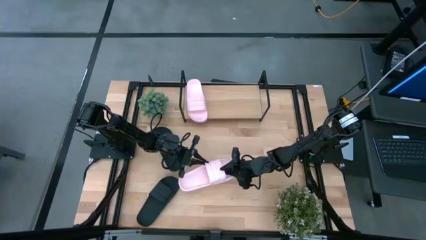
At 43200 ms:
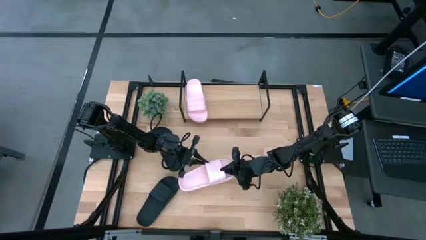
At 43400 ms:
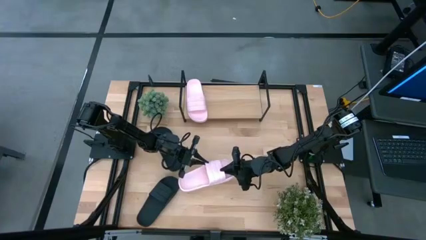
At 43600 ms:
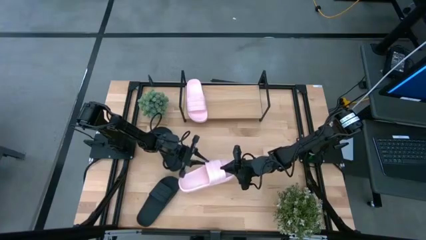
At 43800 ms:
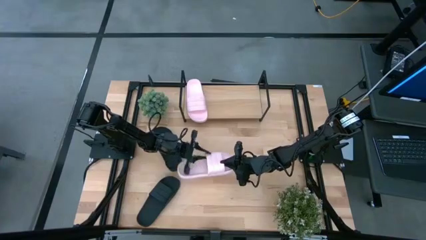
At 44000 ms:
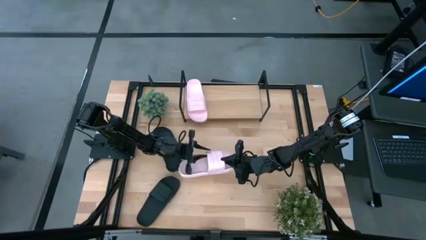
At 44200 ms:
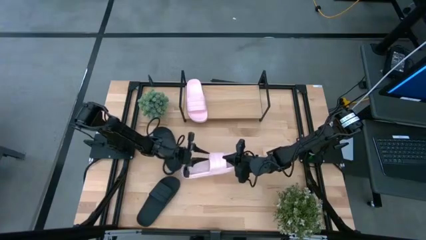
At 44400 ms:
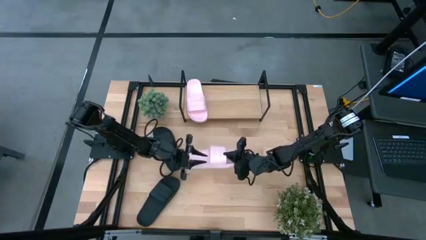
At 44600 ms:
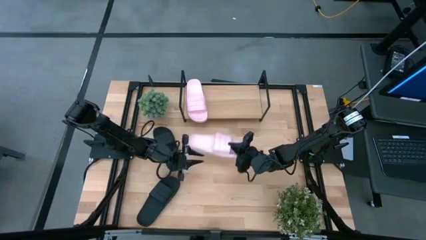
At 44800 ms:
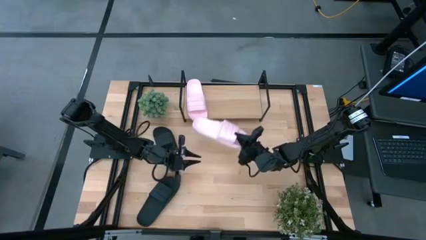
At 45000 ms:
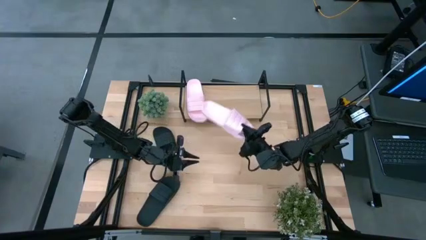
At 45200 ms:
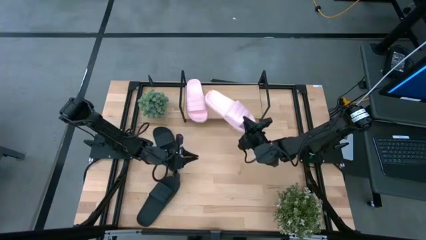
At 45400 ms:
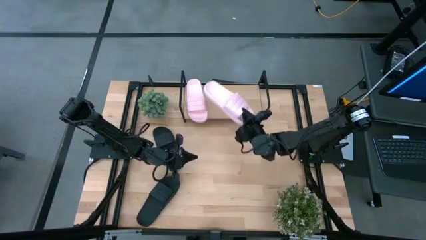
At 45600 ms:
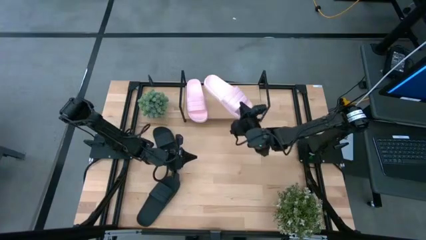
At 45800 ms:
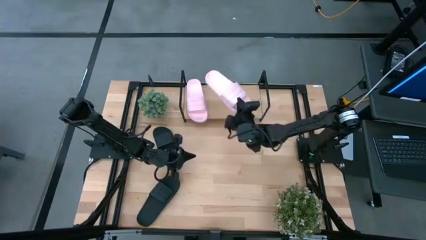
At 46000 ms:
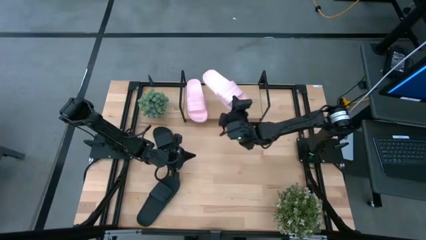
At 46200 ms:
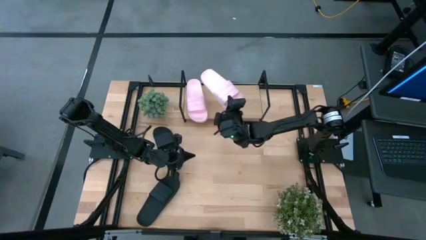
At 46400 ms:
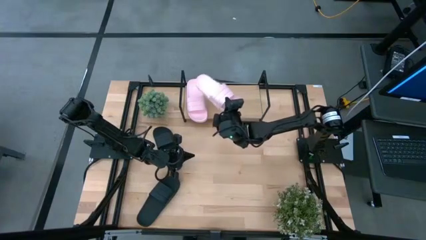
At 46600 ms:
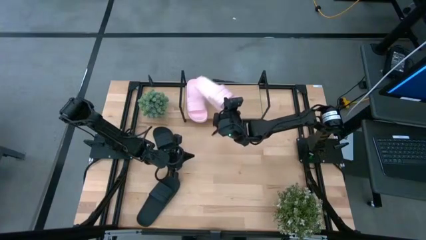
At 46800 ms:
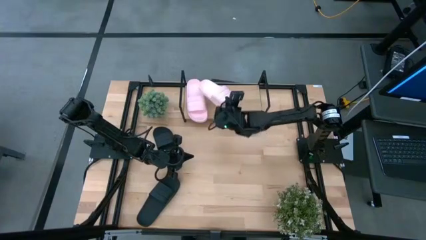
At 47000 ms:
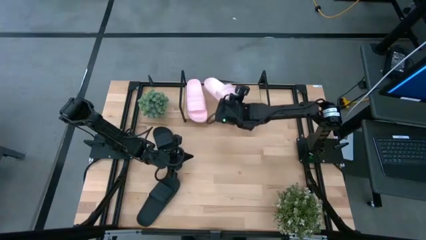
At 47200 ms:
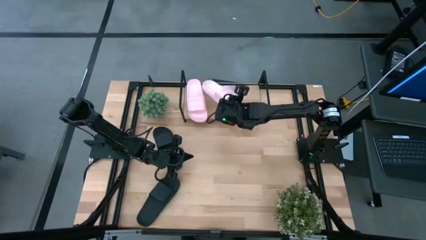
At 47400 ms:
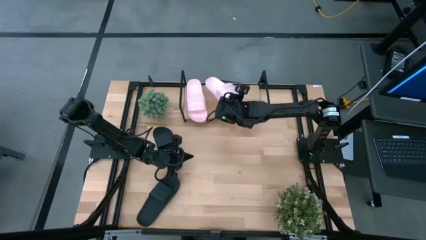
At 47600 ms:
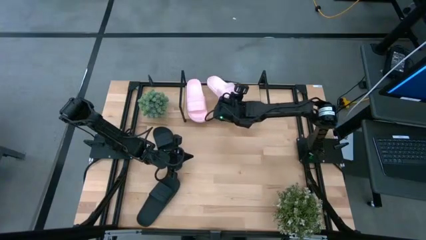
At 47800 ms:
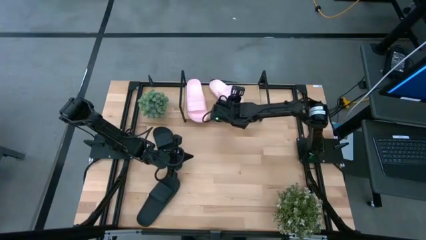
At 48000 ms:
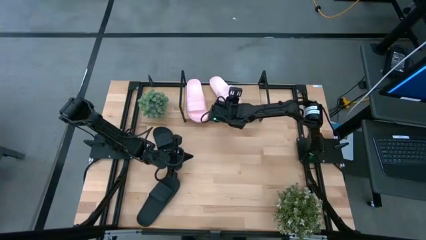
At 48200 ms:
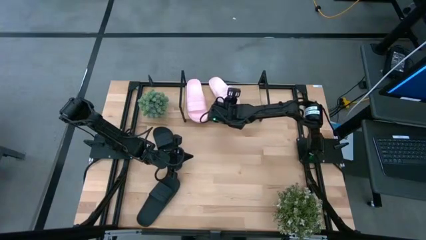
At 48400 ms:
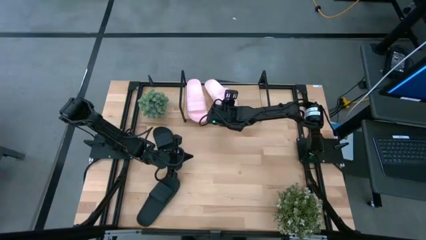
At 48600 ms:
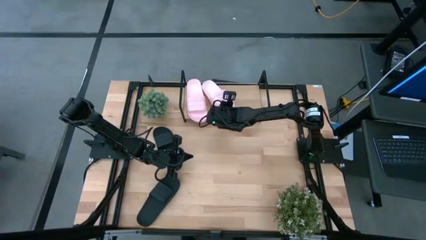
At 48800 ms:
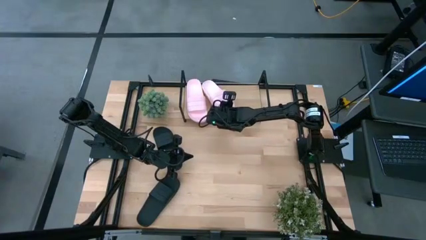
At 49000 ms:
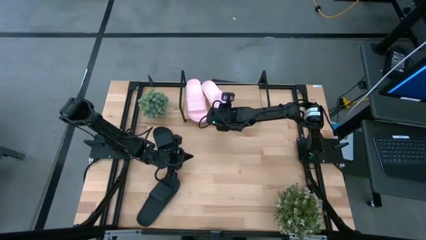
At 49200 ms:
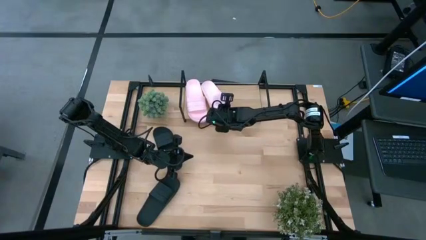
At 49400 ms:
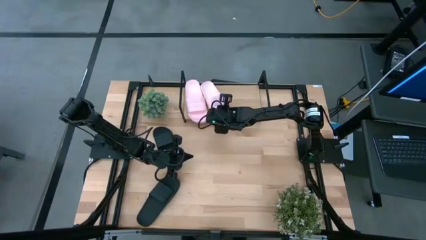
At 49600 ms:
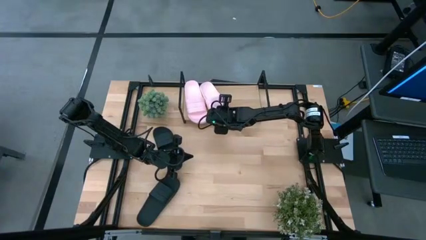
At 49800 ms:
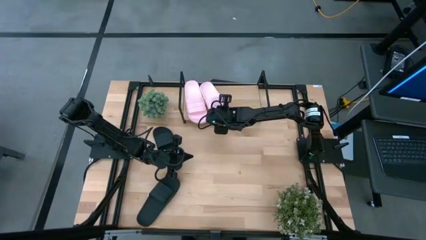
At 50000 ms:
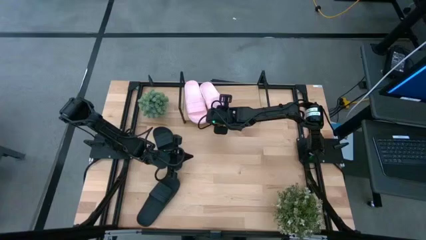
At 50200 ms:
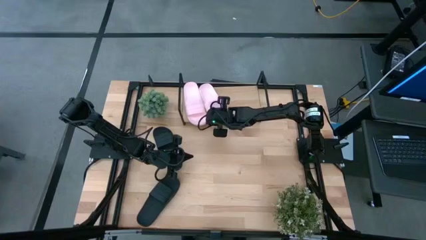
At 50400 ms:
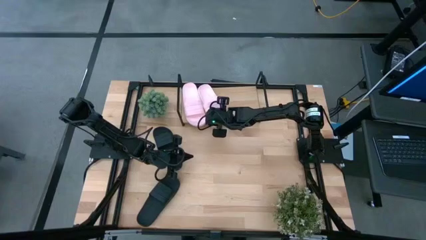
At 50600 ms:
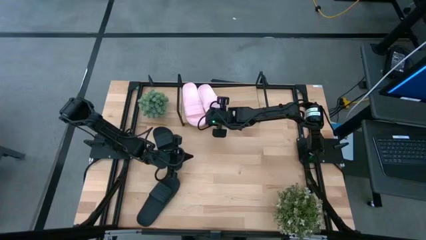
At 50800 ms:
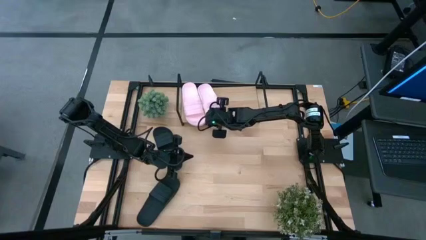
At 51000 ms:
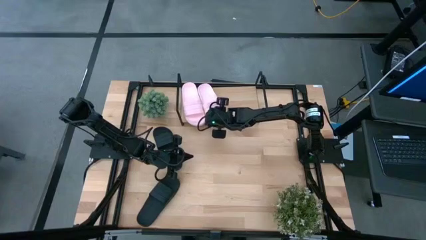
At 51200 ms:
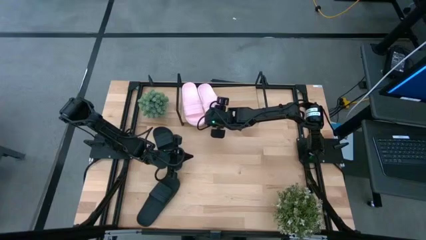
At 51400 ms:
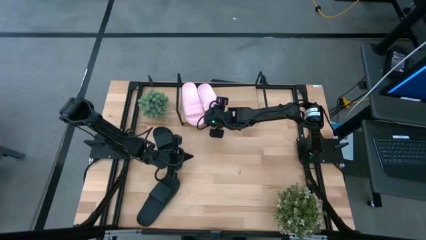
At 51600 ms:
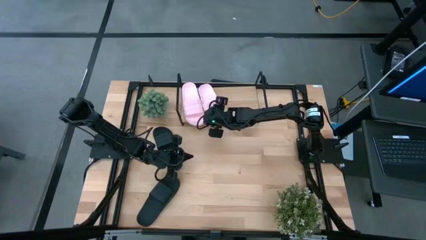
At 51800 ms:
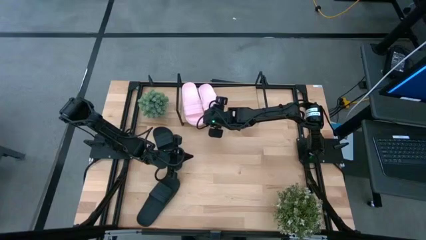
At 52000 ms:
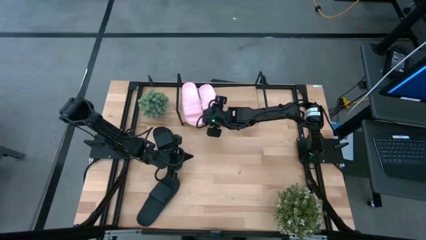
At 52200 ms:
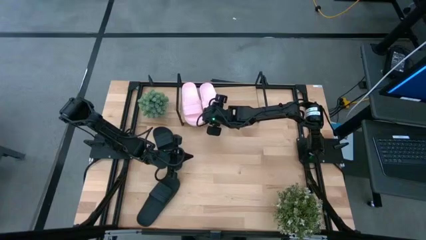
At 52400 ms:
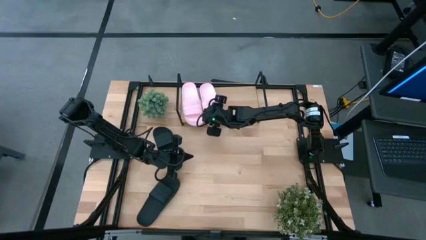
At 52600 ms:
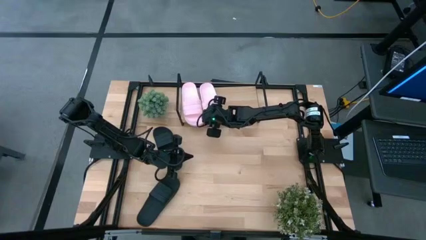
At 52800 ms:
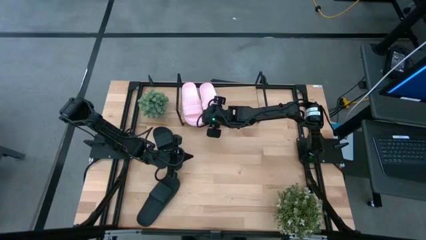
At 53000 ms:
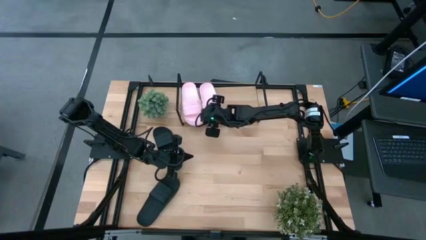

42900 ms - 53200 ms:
Task: Pick and place slides into the shelf
Put the pink slides on the shelf

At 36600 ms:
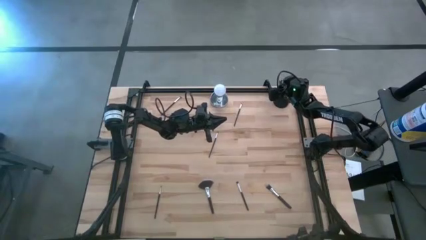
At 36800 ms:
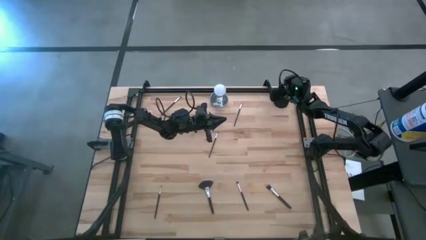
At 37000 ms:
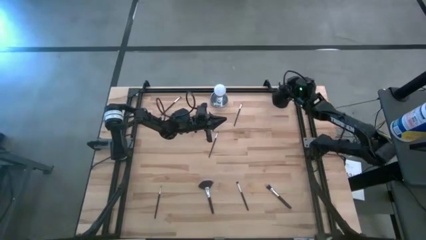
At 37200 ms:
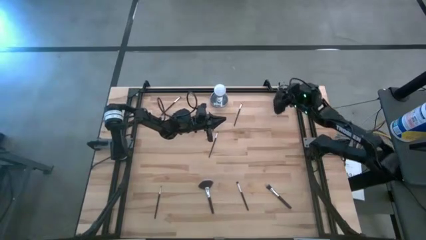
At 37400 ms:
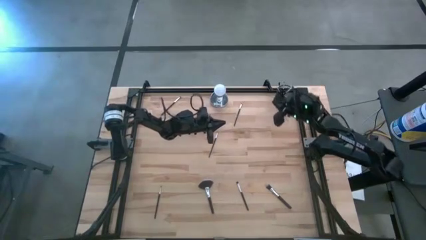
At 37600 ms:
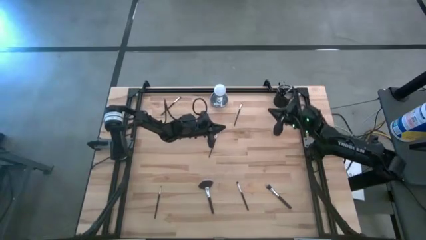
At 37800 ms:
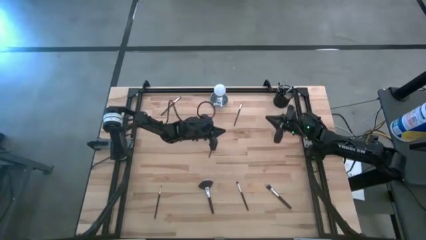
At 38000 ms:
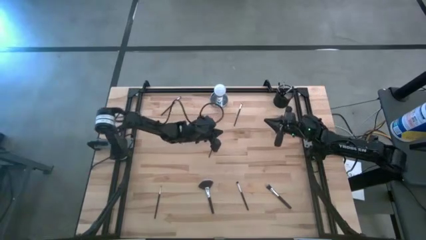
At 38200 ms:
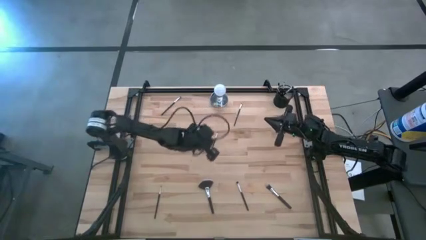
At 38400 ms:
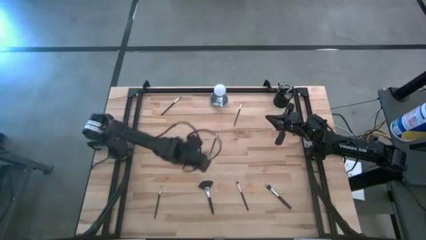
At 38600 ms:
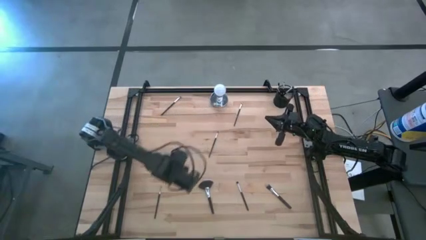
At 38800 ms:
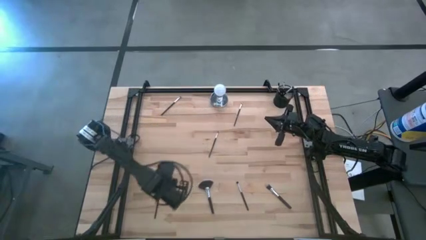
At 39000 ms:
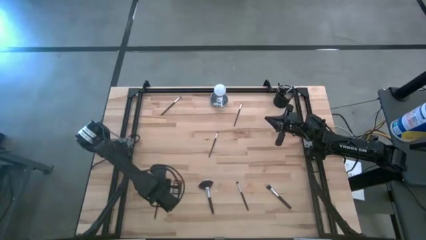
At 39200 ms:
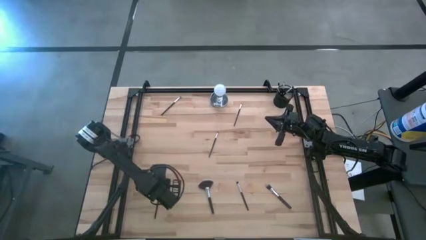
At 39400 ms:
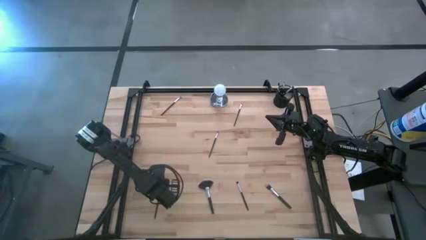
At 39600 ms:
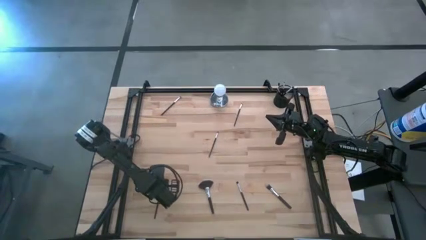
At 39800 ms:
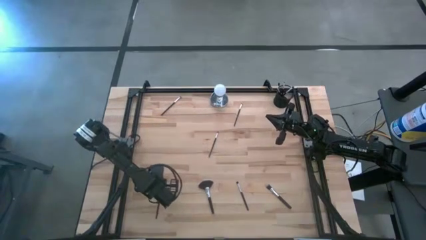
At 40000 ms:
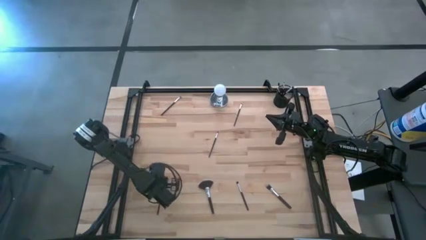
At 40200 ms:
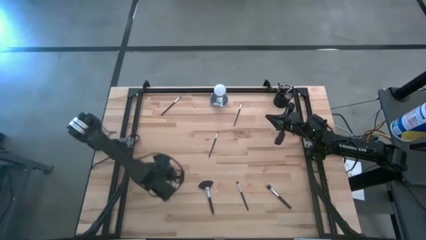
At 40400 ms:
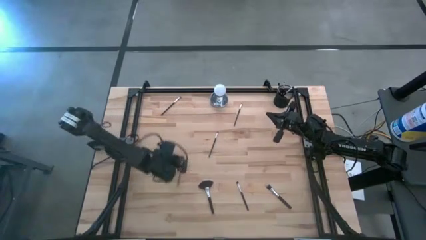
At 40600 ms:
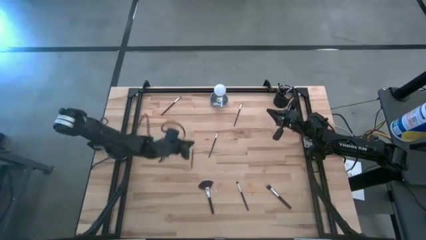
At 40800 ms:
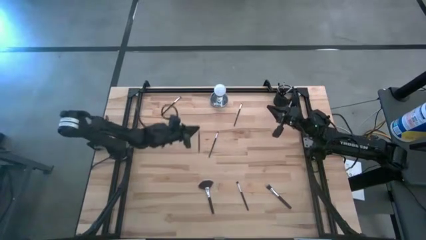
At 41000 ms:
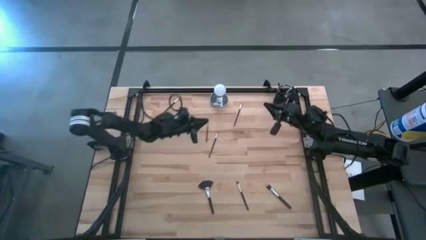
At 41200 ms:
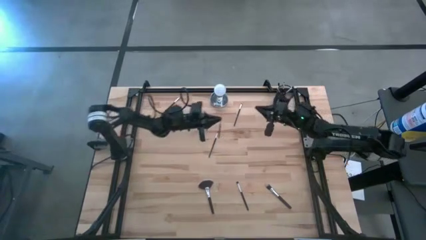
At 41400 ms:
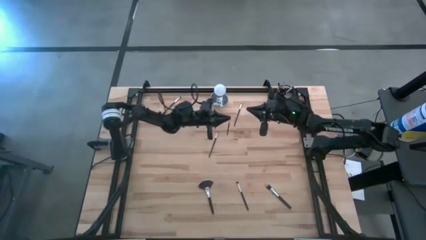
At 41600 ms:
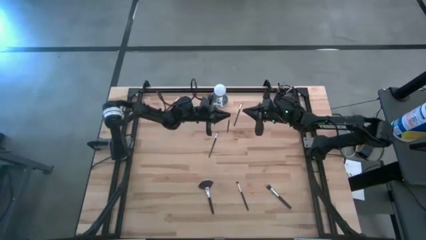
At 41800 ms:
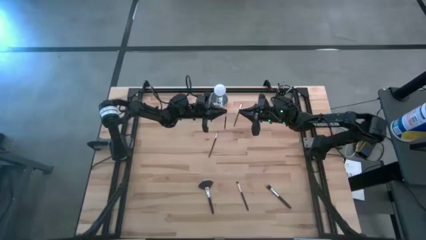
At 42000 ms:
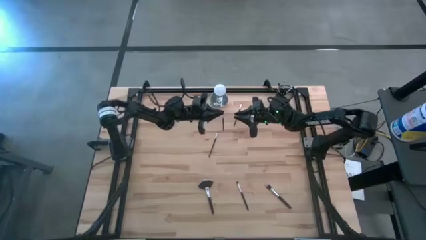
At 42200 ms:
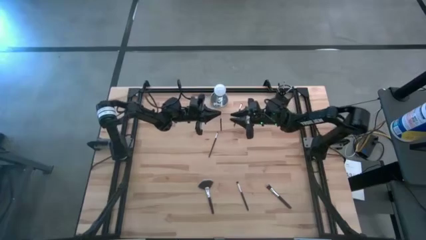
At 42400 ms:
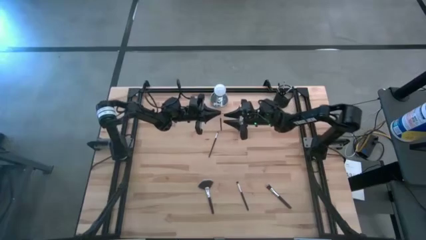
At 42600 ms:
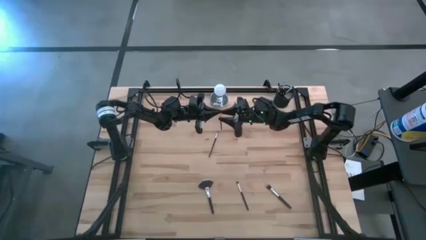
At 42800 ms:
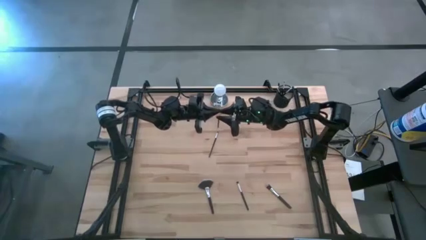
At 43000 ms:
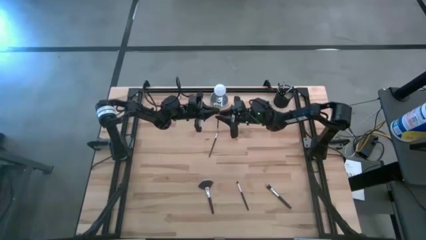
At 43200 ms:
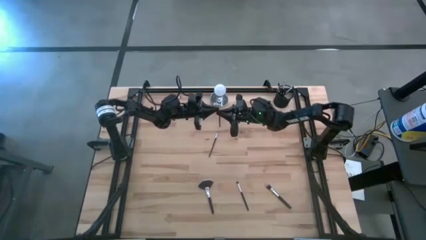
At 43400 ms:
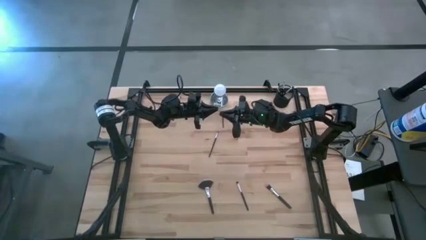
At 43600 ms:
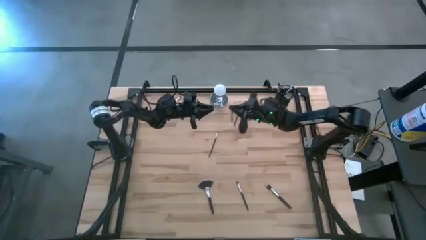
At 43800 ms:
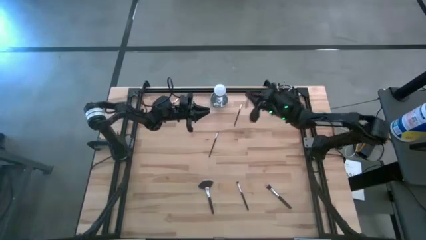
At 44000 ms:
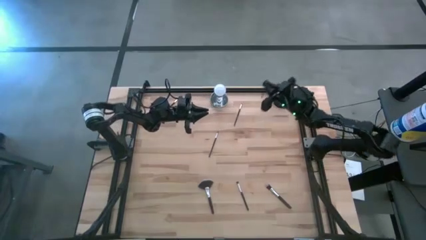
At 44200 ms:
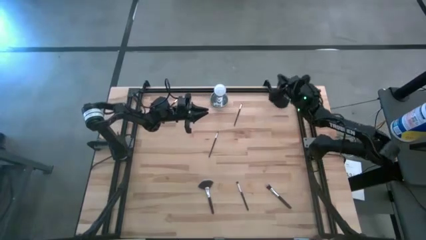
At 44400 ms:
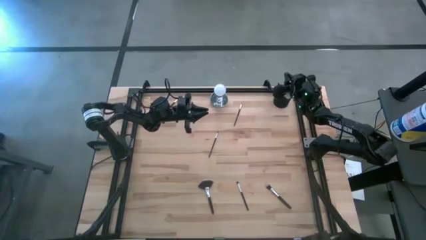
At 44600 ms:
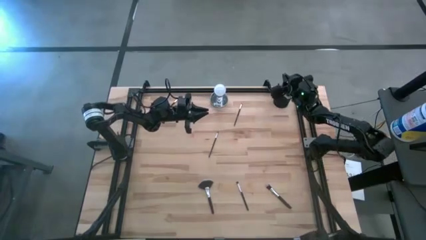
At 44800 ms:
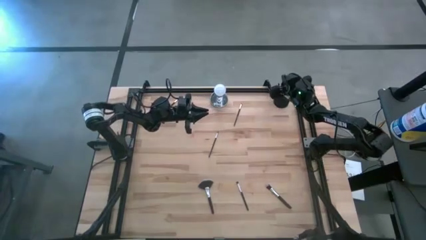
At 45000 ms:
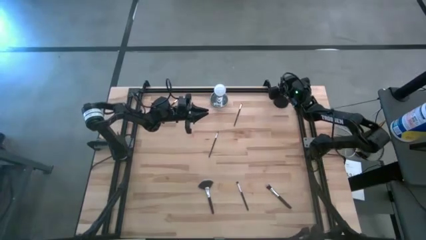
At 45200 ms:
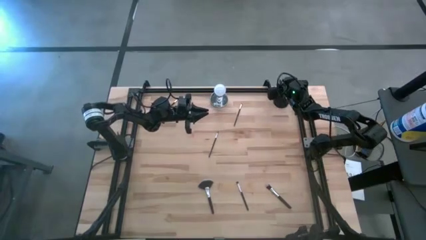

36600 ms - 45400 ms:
Task: Pick & Place Makeup Supplies
Put the makeup brush into the makeup holder
